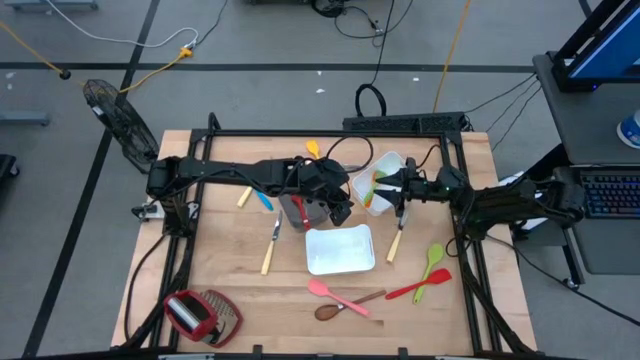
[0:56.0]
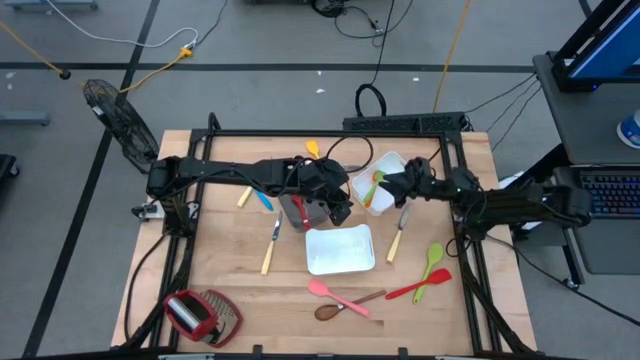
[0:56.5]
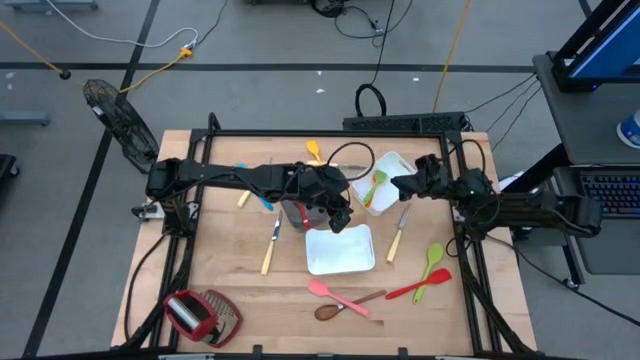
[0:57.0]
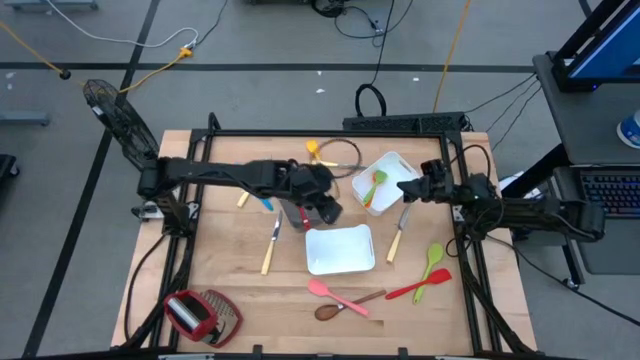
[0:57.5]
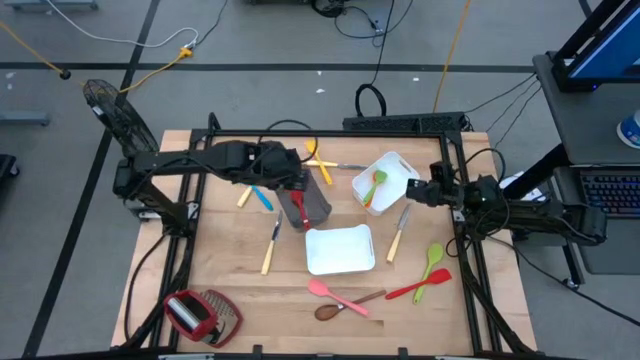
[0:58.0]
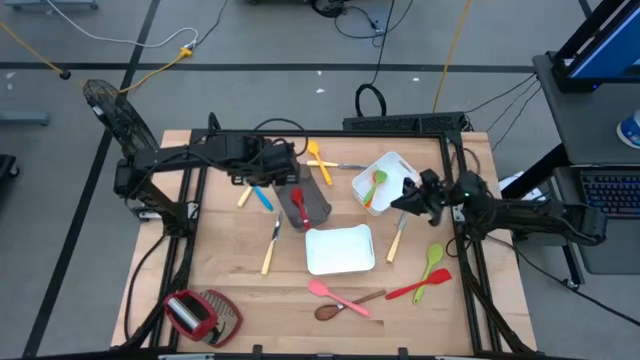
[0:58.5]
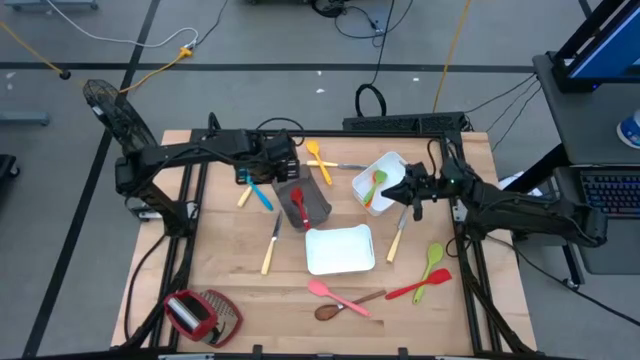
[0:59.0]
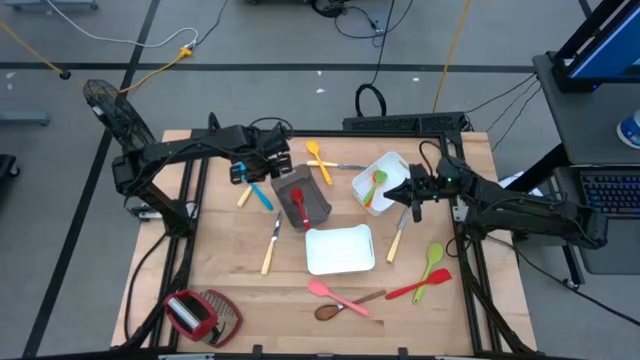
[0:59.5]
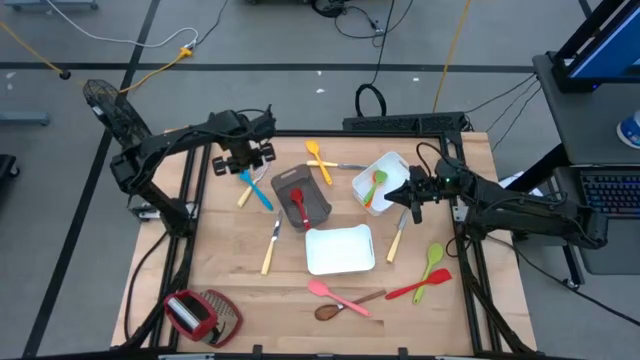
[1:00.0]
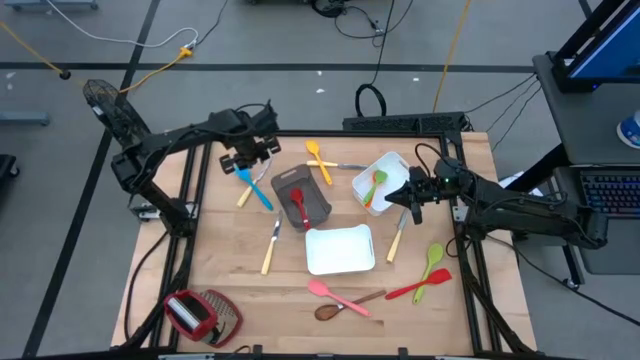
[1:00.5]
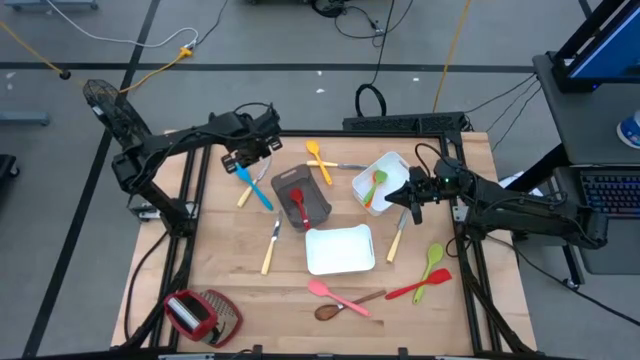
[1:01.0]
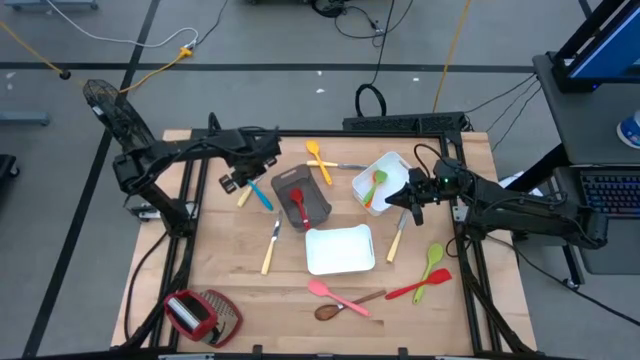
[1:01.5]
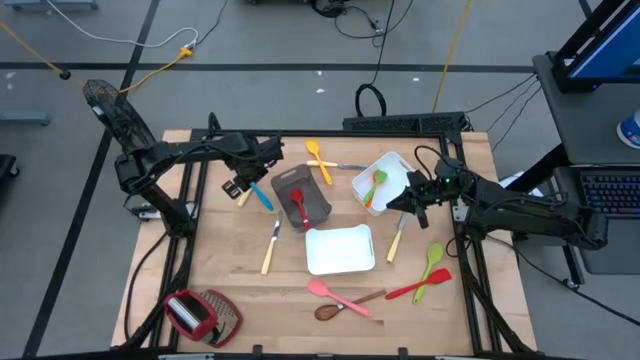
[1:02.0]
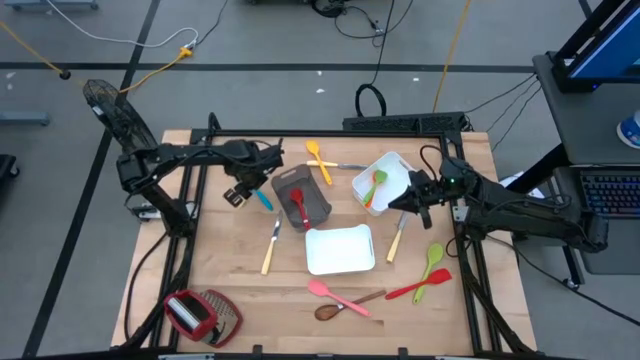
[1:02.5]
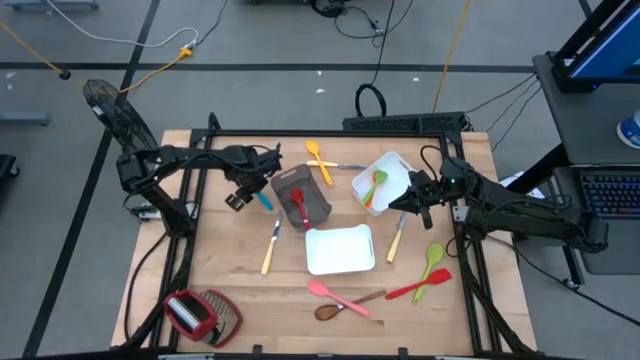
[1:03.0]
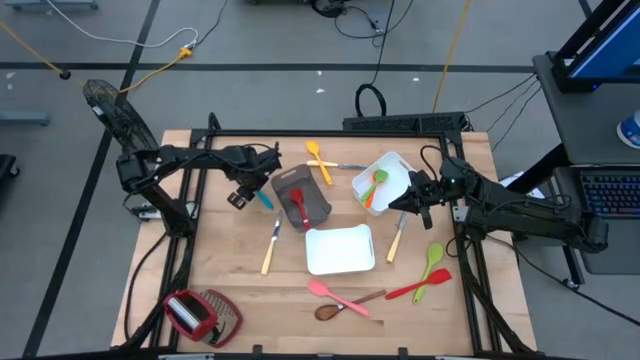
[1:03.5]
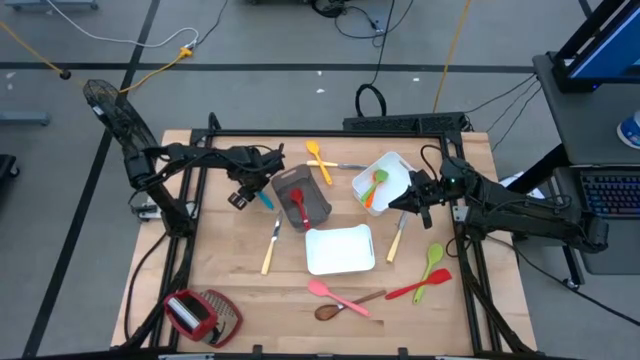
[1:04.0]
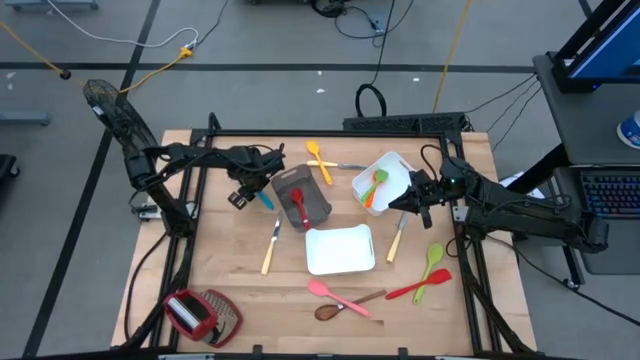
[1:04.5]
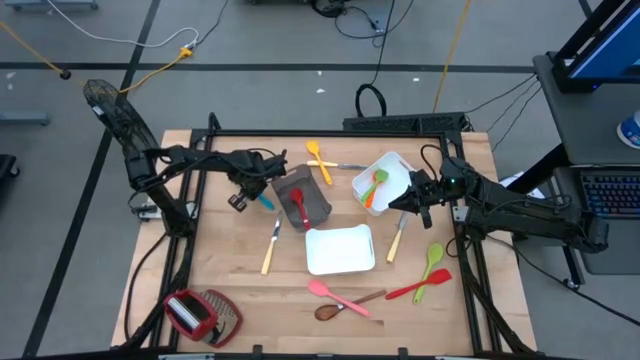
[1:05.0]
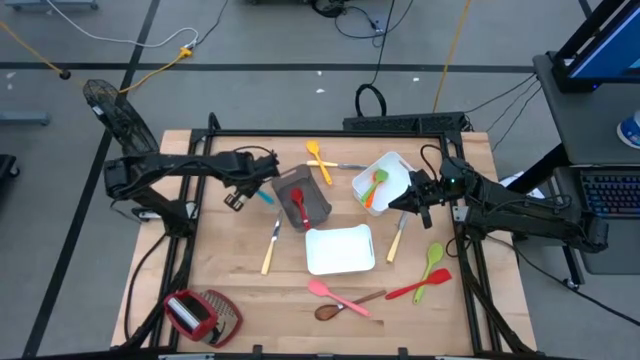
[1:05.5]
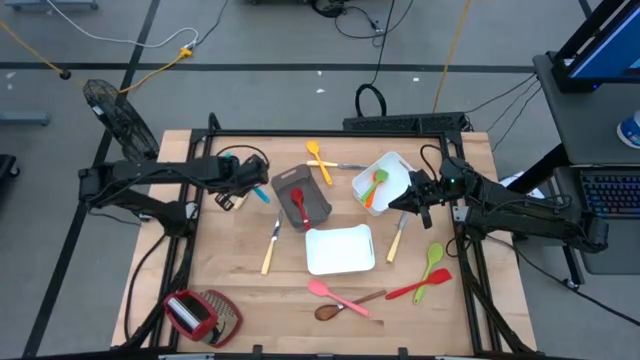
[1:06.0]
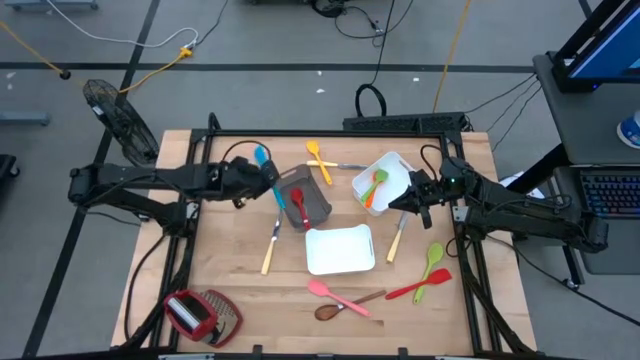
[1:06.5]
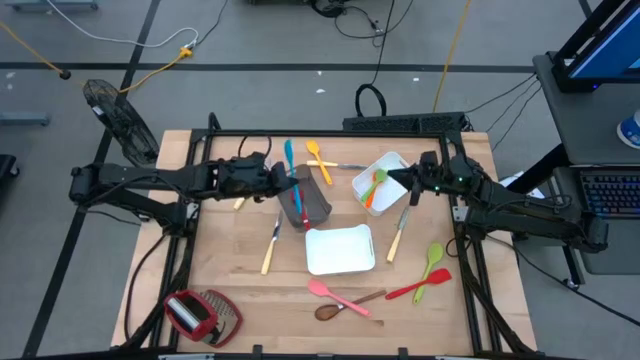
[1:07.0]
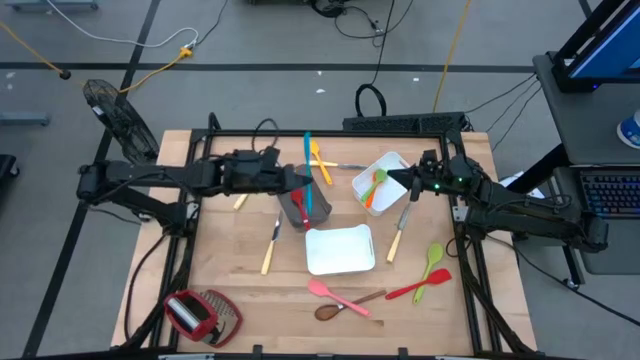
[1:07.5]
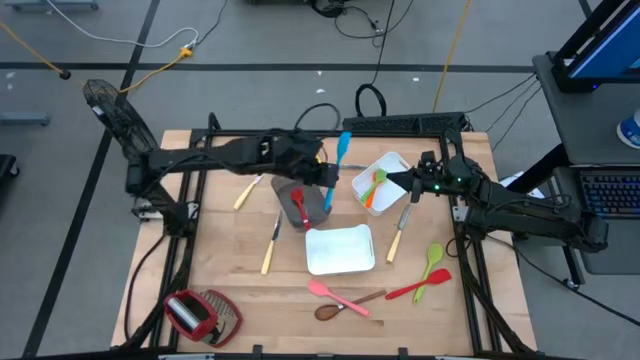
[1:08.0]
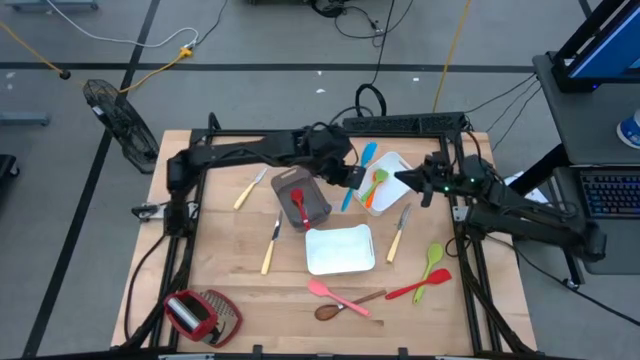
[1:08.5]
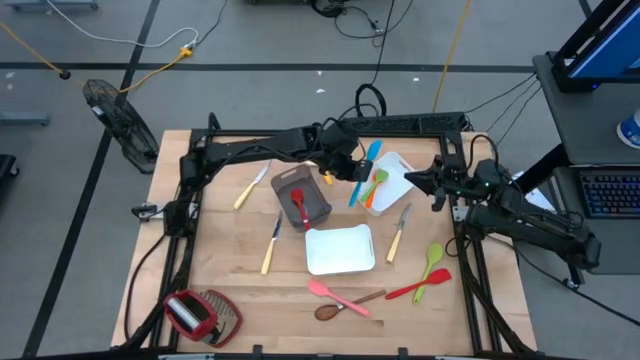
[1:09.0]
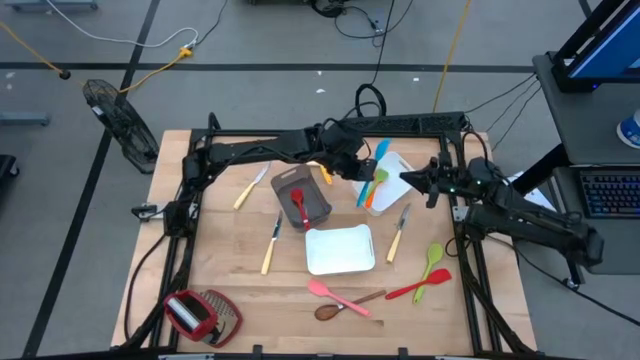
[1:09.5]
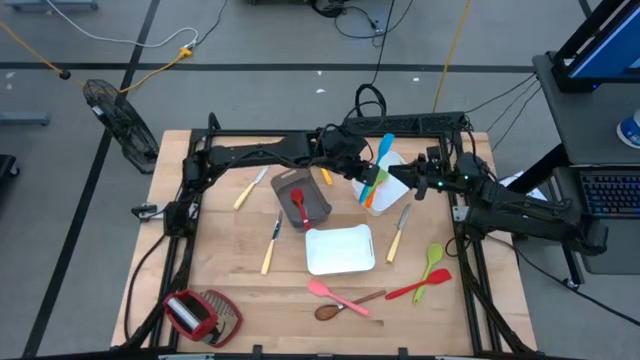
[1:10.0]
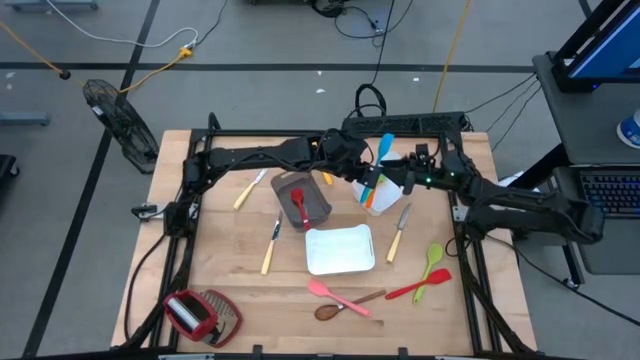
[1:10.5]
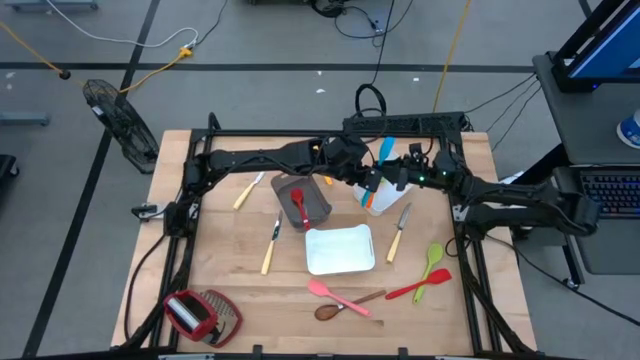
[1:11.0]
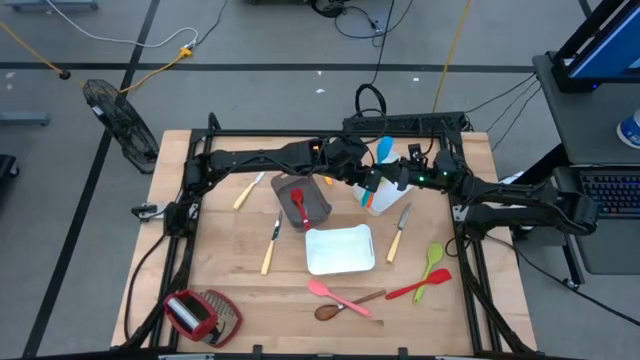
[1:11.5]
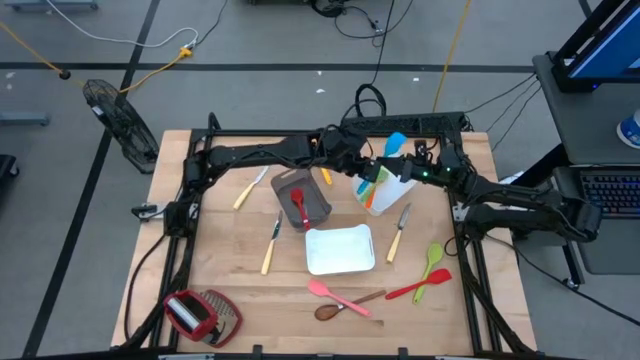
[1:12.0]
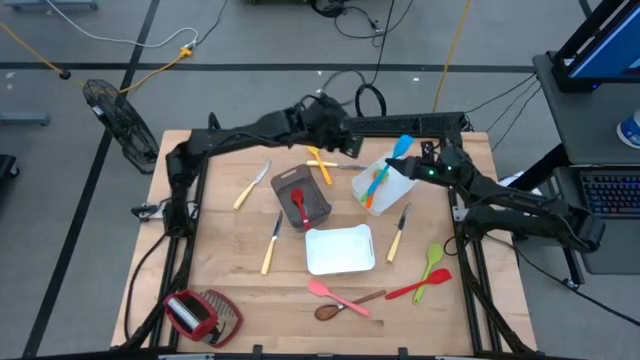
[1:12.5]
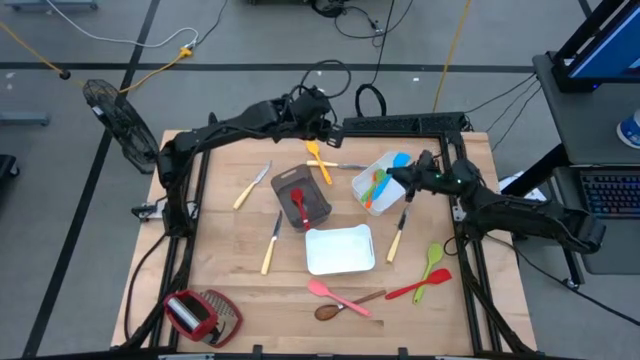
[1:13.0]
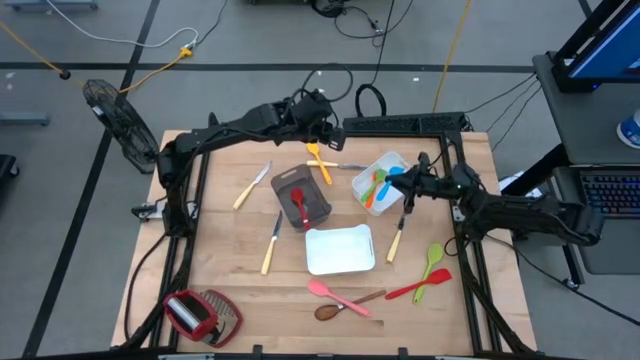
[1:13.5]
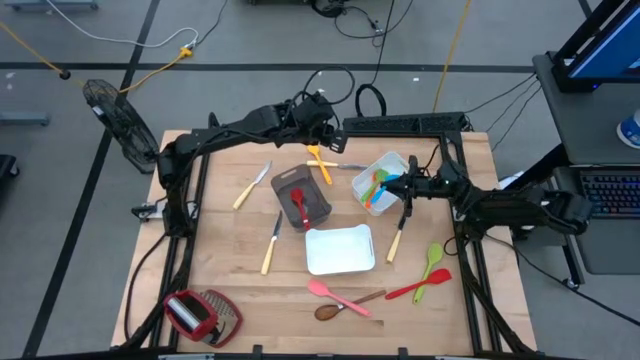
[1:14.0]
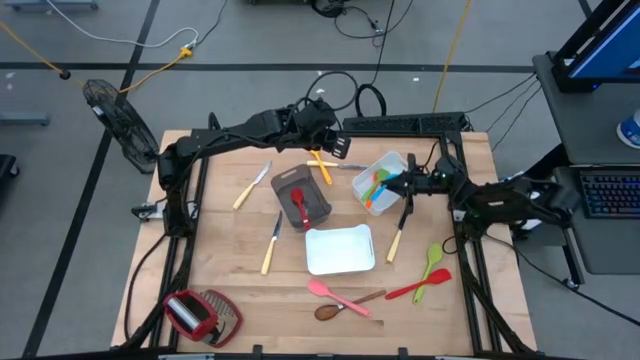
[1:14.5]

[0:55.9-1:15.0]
Task: Pick & Place Kitchen Items
Put the blue spatula into the top white bin
